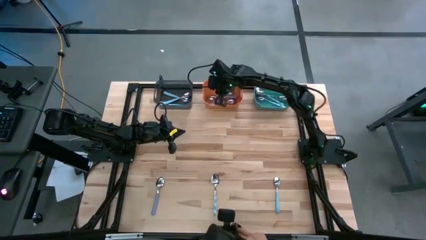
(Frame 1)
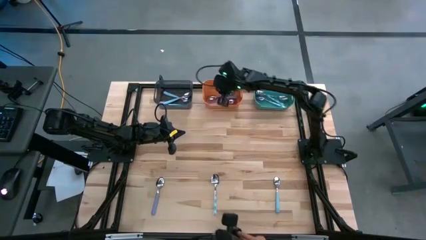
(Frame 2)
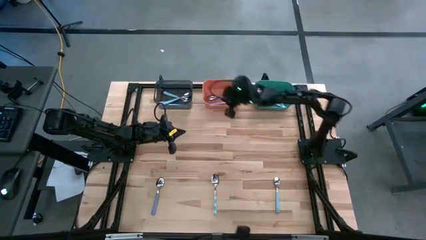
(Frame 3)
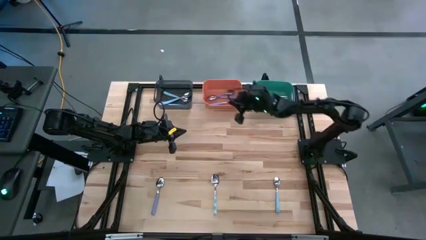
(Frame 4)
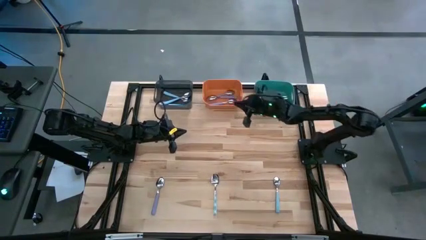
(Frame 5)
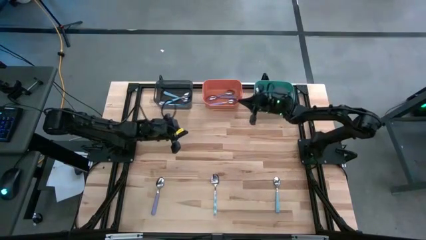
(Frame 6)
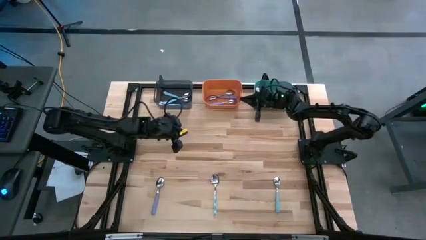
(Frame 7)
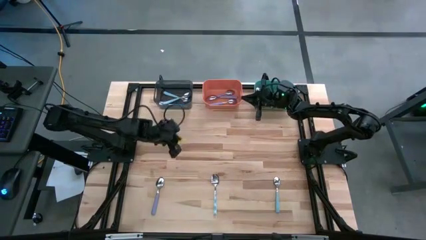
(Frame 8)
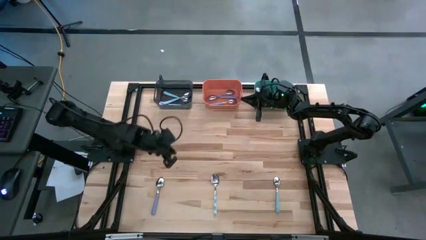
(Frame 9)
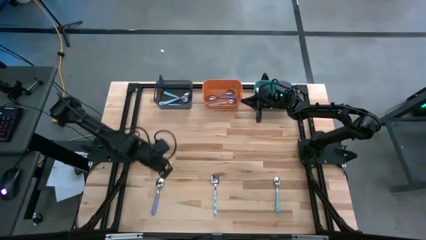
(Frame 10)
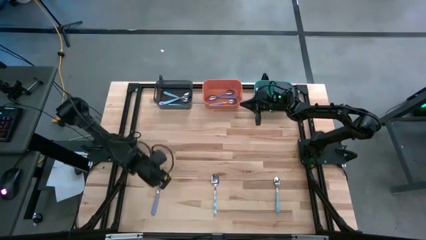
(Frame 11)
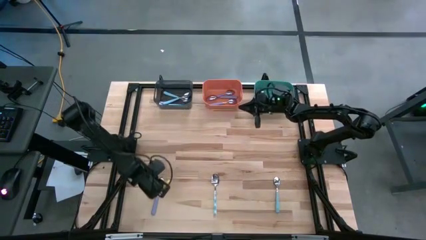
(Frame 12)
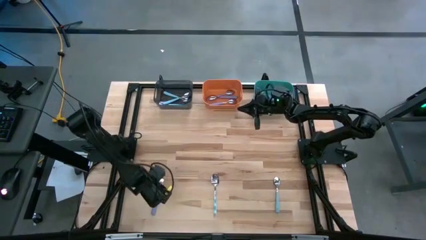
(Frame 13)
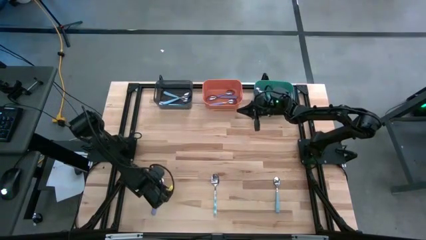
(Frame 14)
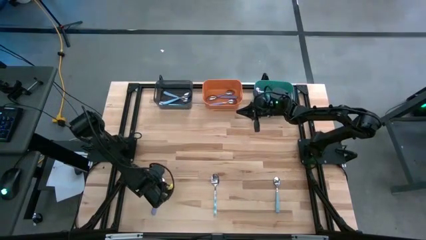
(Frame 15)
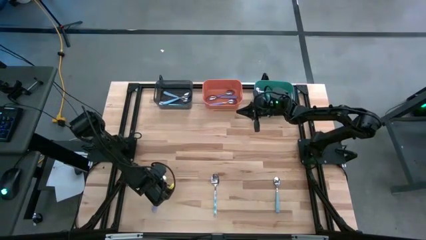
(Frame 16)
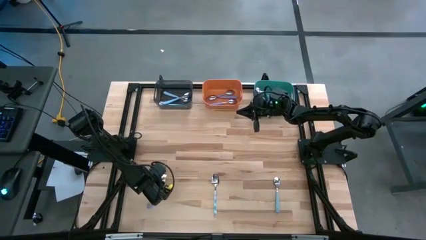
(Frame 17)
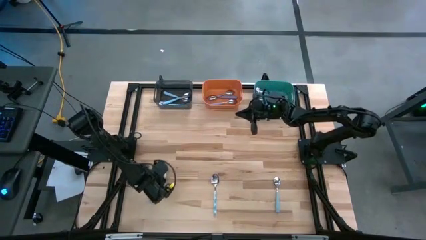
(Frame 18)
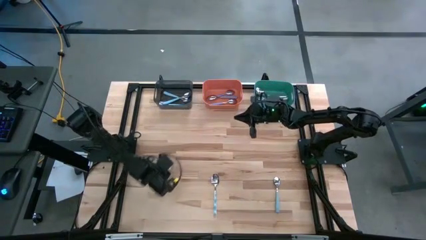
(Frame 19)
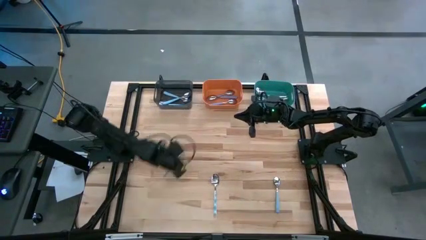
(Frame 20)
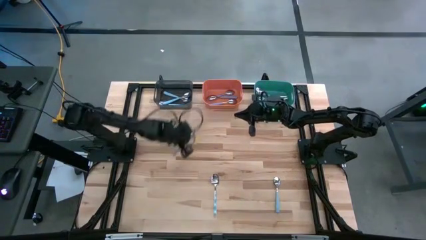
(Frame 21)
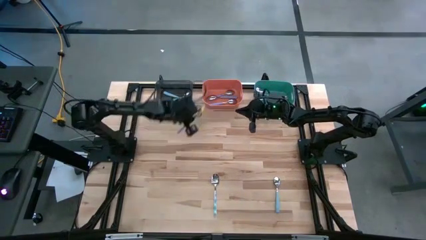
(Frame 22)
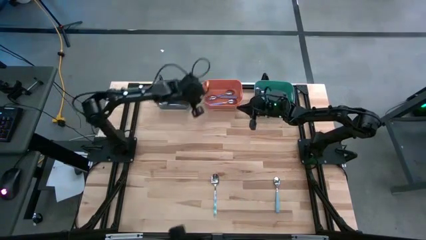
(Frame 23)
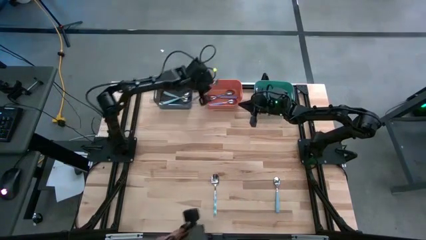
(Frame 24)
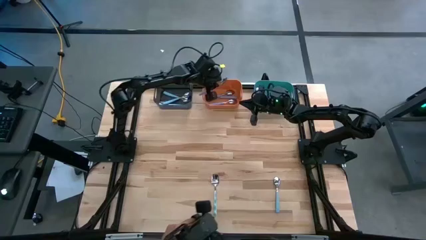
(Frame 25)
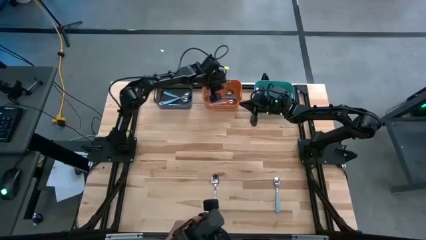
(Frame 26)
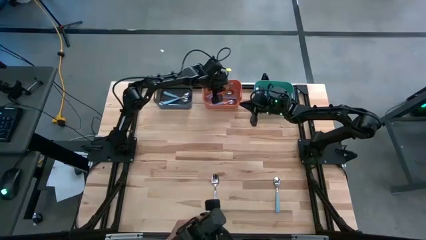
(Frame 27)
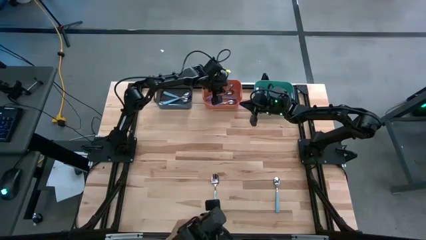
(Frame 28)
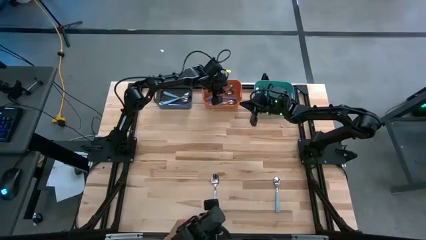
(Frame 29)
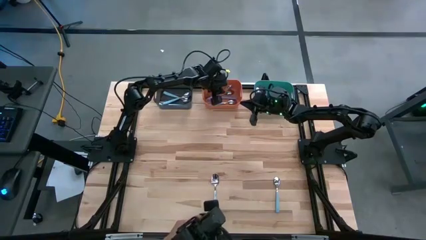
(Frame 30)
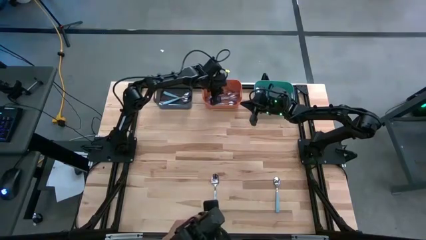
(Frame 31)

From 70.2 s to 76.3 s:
Task: Sort silverware by color (type)
Put the spoon into the orange bin

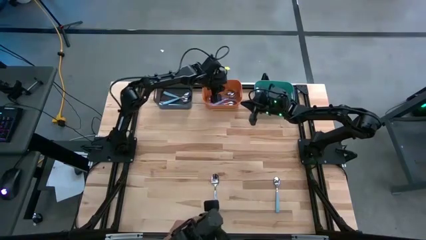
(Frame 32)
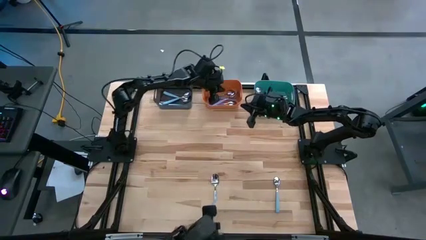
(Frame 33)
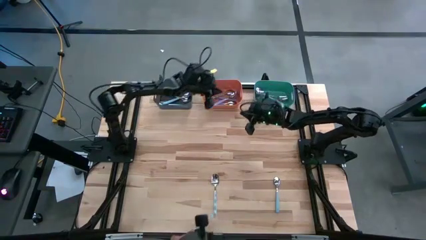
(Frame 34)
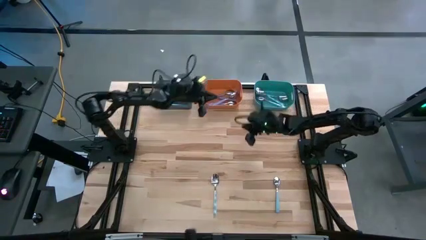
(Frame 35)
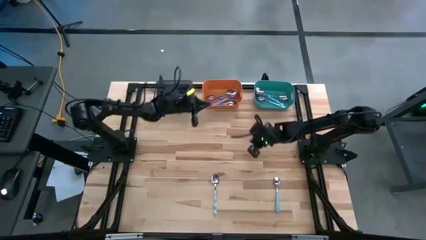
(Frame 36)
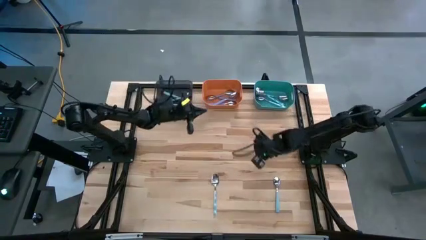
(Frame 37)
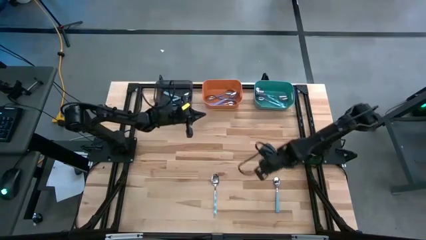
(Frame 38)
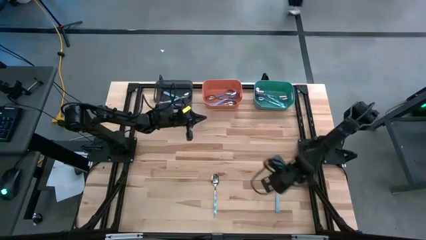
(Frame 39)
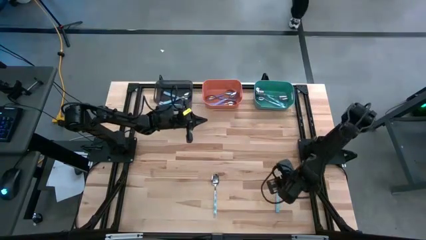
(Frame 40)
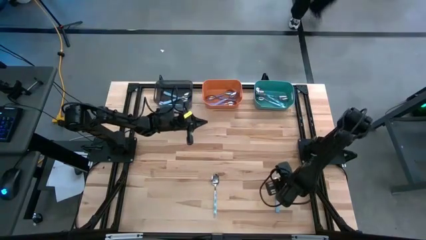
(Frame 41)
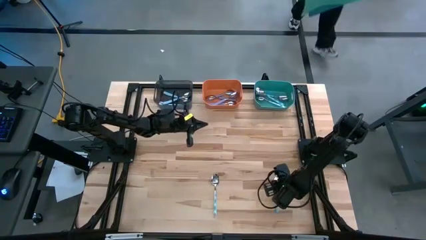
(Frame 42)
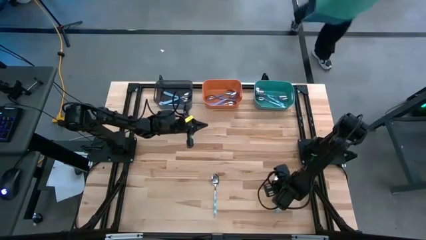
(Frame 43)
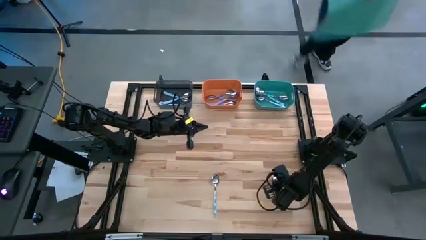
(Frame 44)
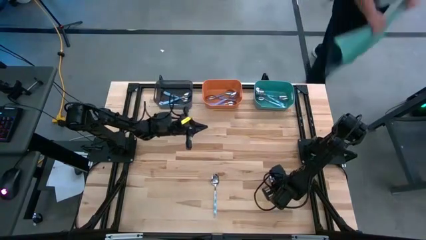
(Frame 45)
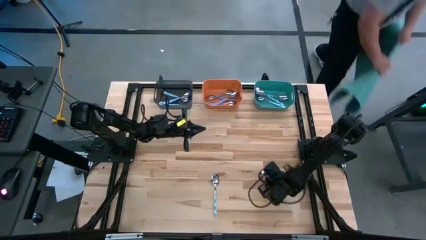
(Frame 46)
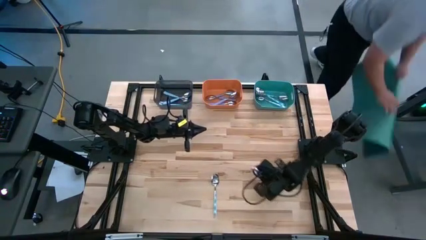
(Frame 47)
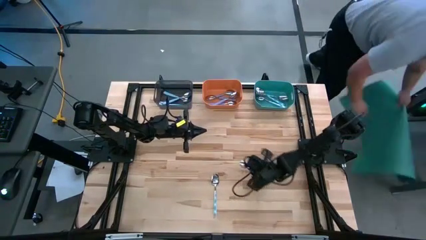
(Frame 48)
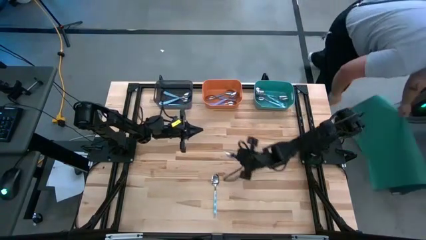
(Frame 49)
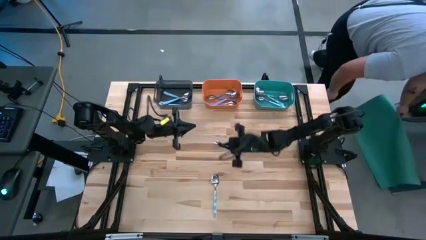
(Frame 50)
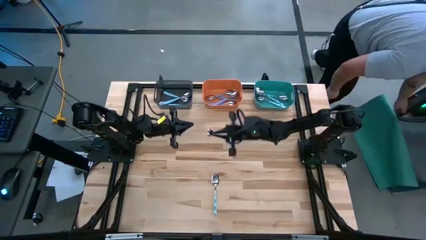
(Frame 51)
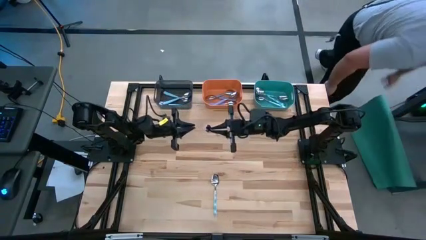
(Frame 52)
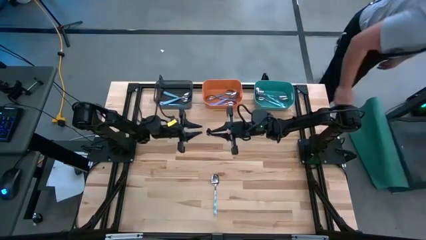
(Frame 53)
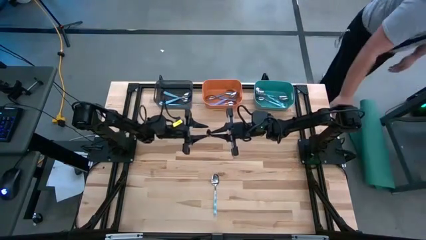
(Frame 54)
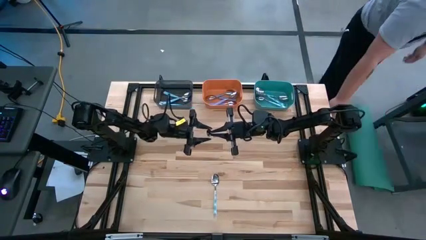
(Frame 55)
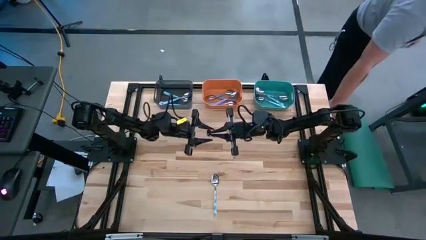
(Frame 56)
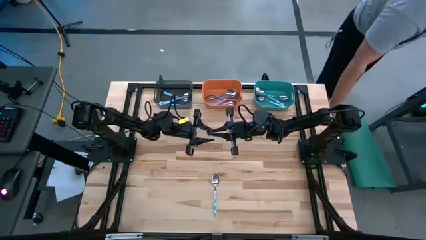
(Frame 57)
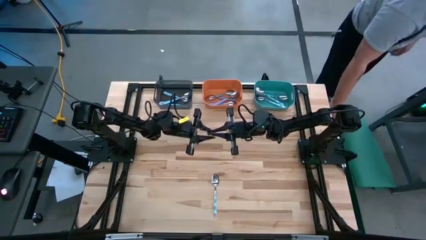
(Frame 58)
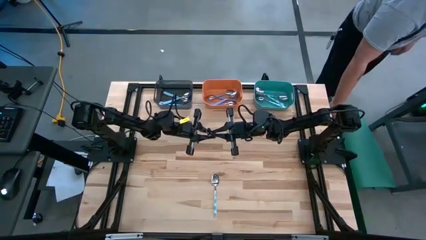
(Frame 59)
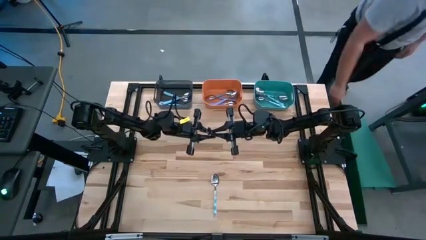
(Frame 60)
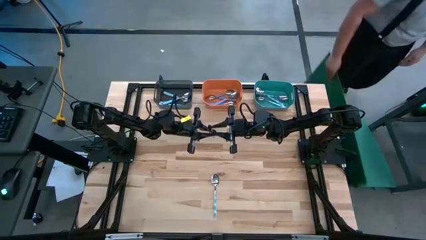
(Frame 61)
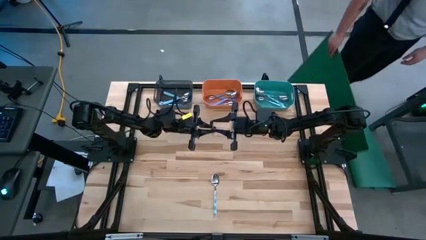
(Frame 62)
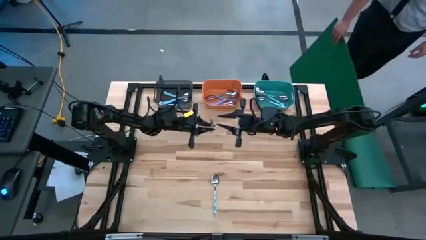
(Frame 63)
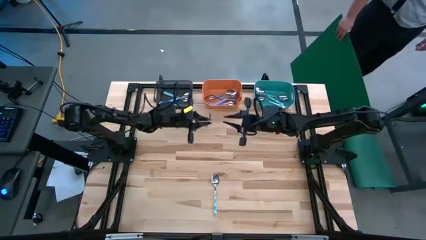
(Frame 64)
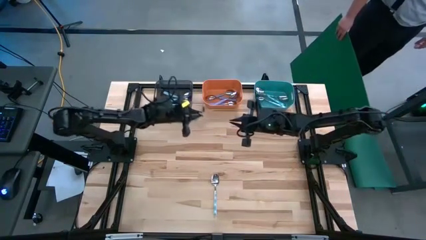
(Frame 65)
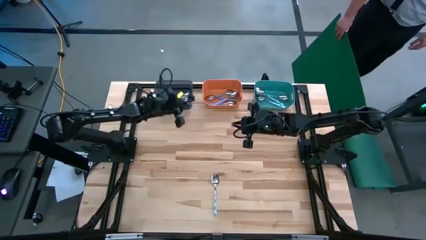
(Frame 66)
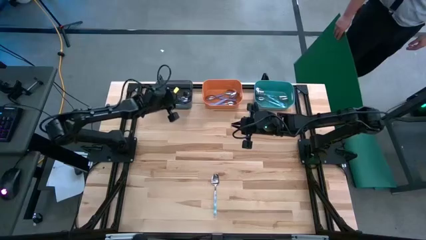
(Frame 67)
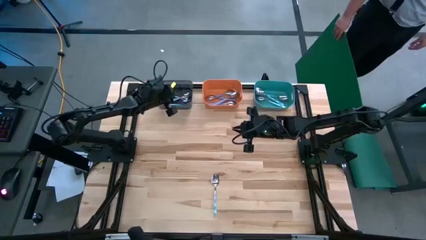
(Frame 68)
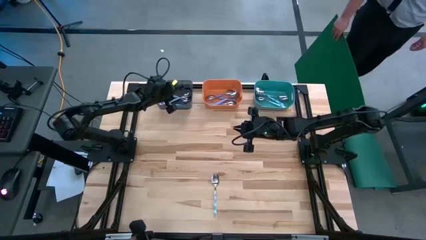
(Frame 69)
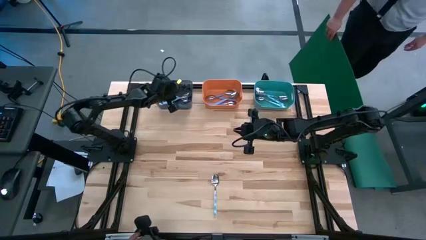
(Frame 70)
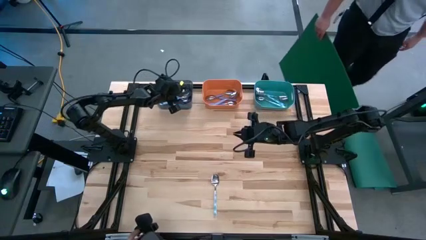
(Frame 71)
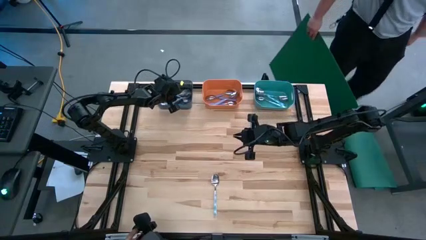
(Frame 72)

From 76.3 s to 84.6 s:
Put the blue spoon into the black bin

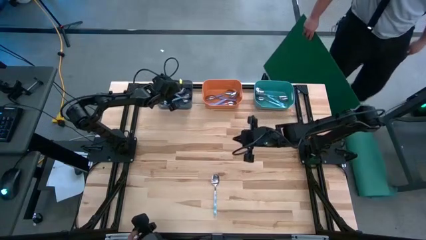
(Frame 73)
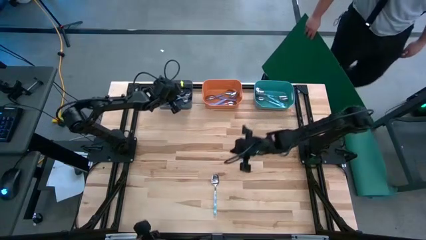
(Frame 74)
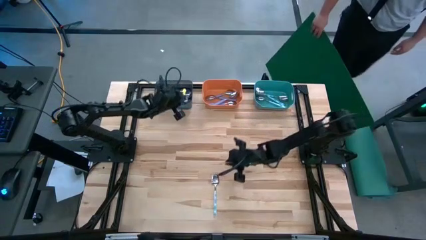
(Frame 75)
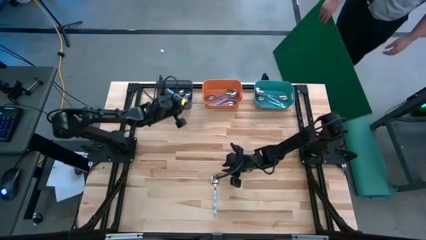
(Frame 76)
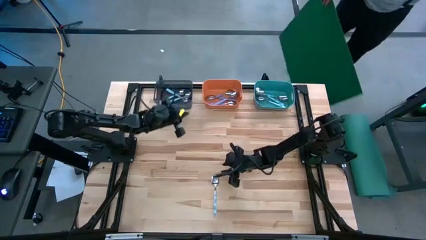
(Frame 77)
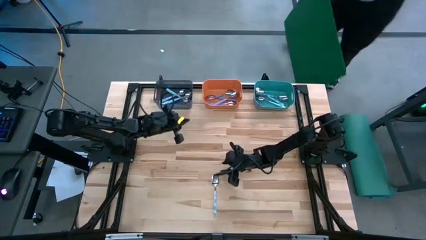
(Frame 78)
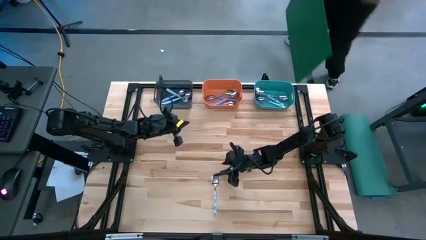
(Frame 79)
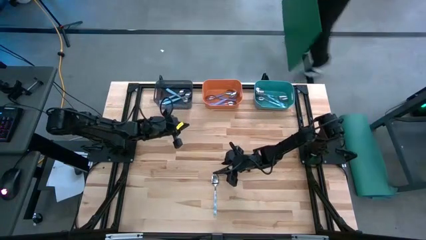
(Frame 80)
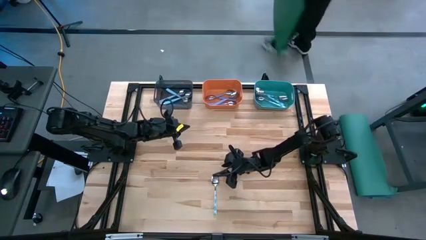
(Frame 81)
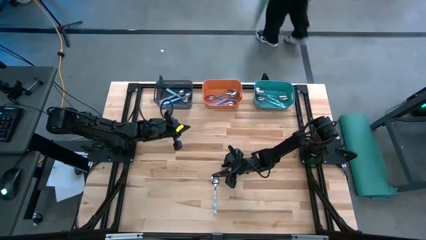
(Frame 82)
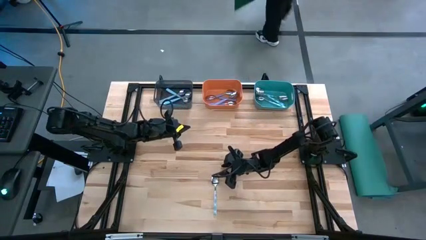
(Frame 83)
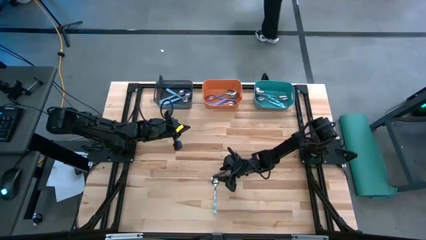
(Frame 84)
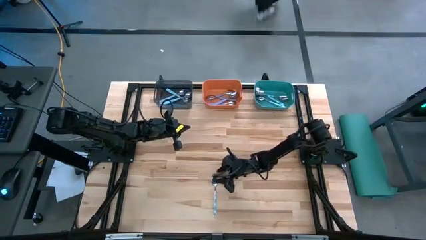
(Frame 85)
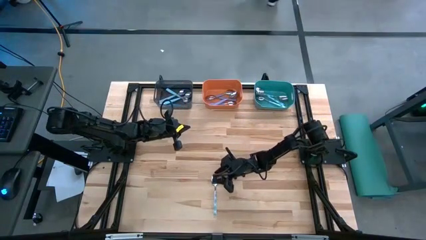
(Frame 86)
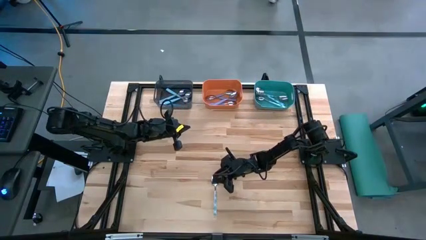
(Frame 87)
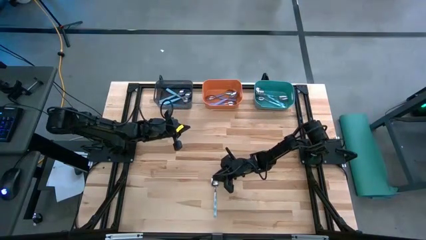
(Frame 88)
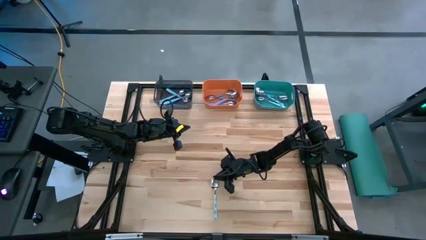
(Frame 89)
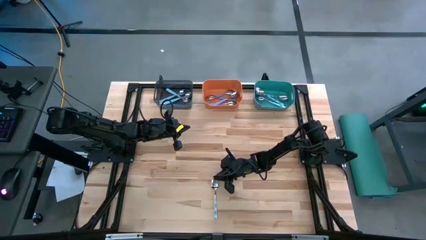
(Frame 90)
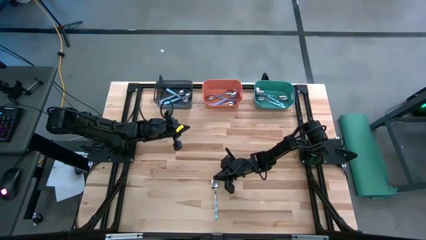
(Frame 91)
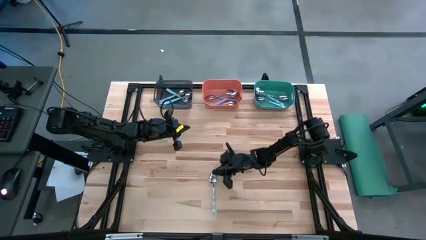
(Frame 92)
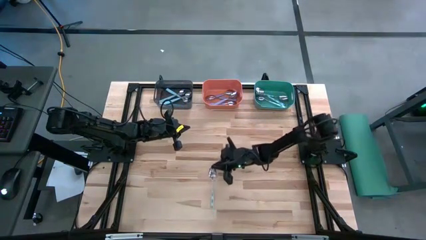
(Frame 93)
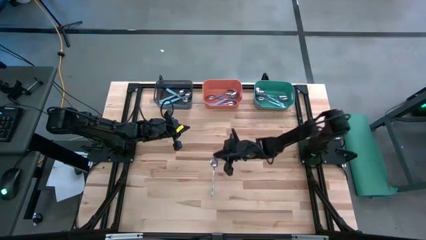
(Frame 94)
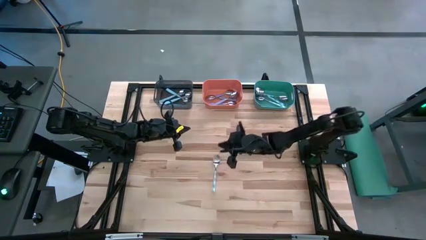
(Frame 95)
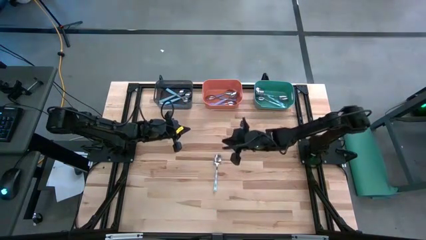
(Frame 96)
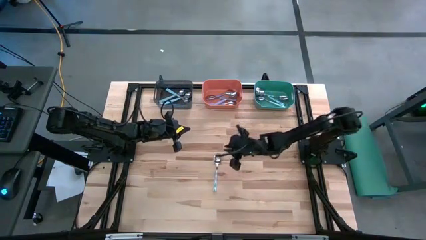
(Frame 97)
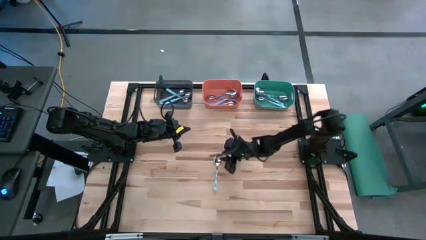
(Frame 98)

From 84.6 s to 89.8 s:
Put the blue patterned spoon into the green bin
